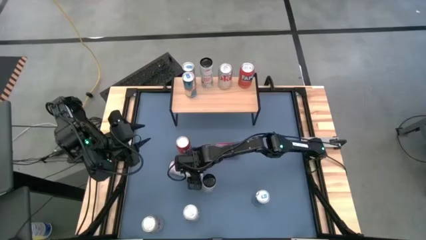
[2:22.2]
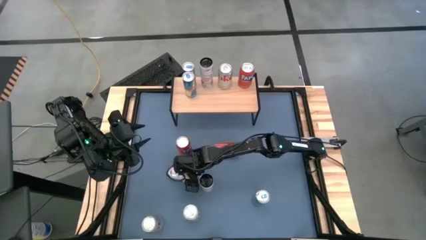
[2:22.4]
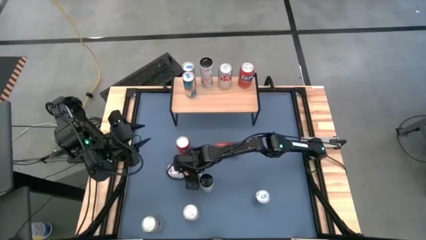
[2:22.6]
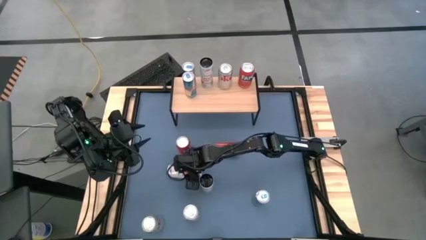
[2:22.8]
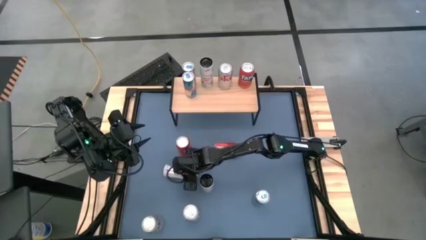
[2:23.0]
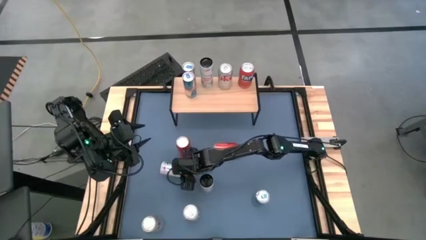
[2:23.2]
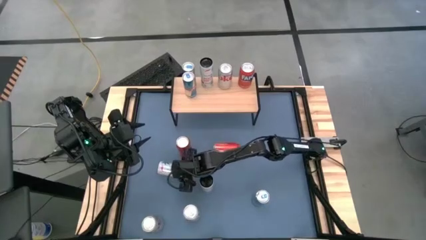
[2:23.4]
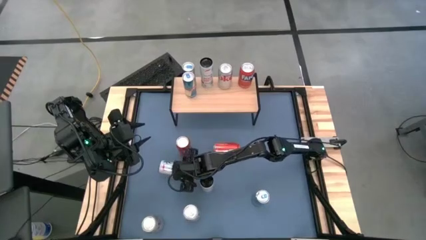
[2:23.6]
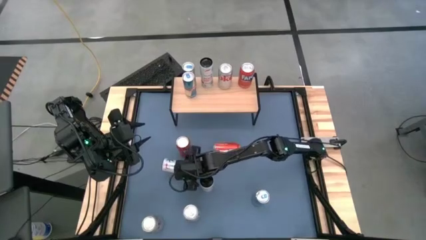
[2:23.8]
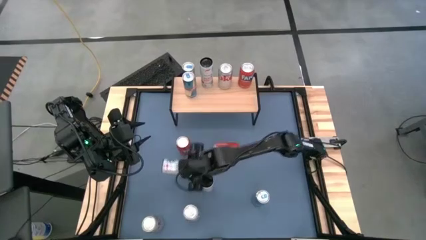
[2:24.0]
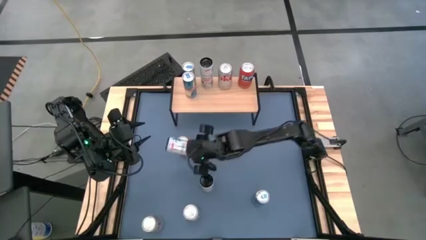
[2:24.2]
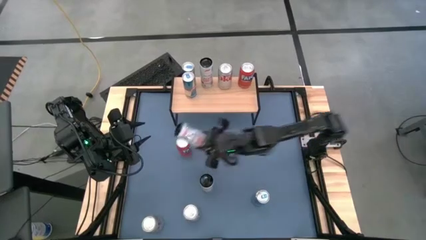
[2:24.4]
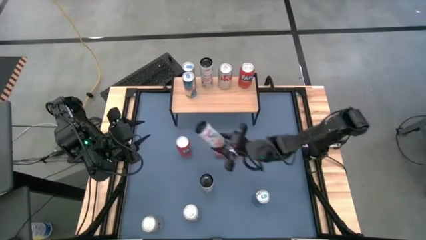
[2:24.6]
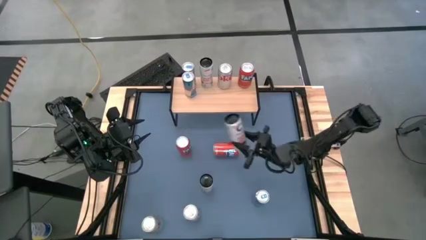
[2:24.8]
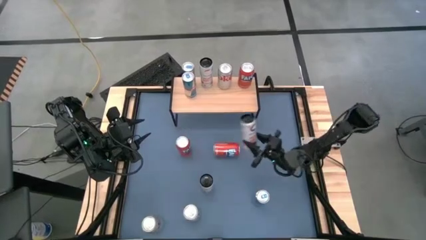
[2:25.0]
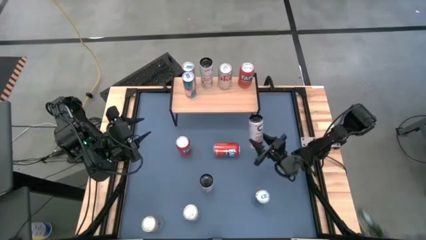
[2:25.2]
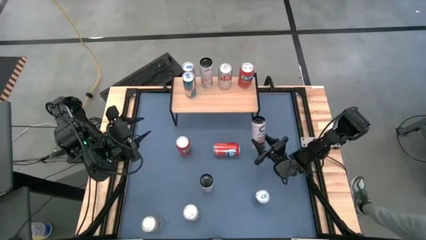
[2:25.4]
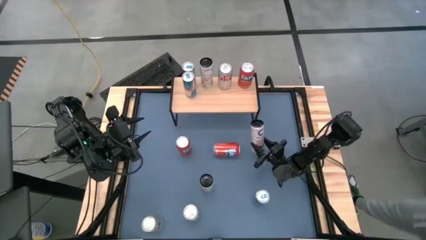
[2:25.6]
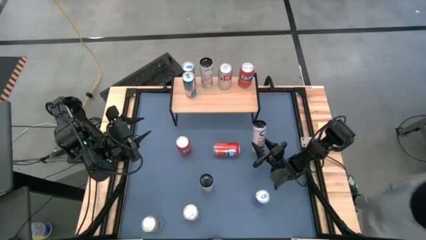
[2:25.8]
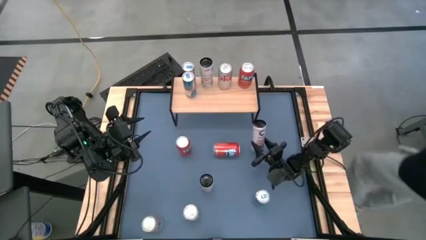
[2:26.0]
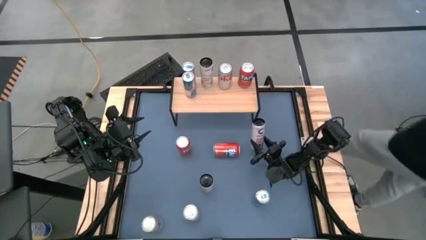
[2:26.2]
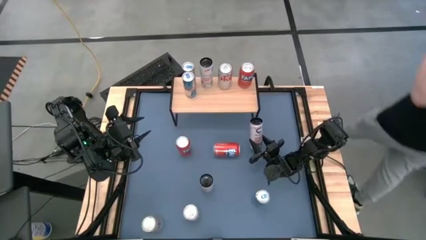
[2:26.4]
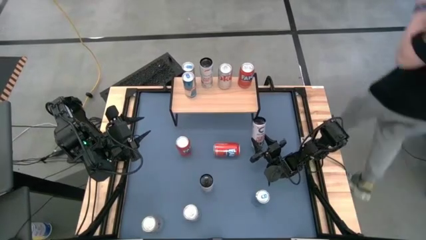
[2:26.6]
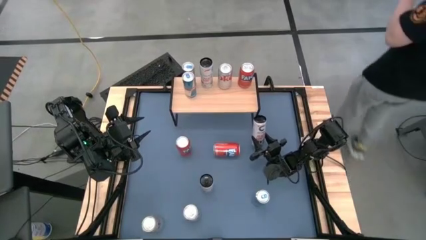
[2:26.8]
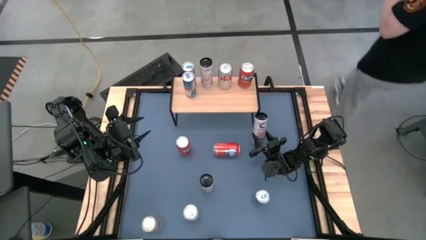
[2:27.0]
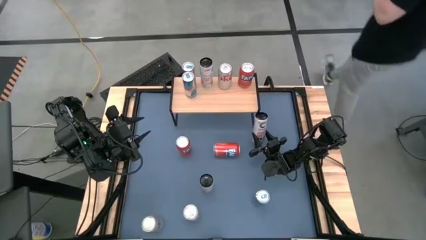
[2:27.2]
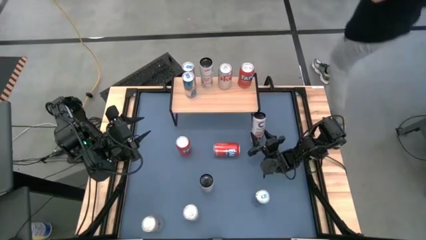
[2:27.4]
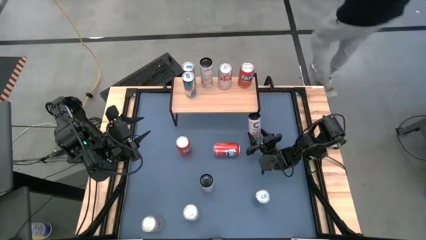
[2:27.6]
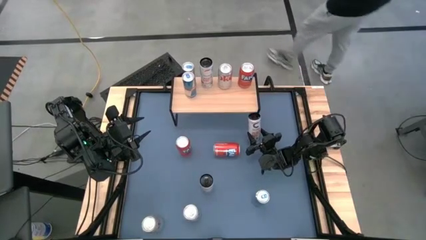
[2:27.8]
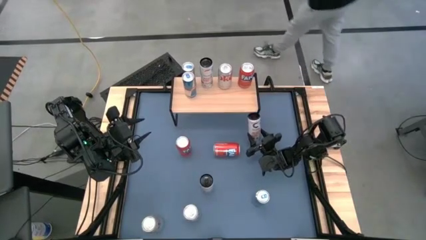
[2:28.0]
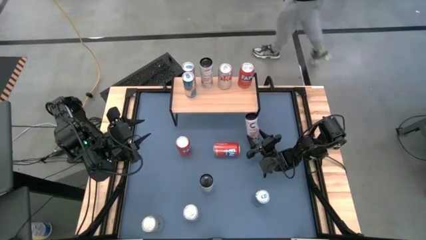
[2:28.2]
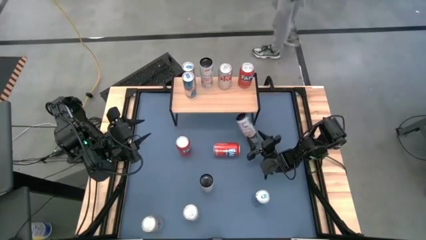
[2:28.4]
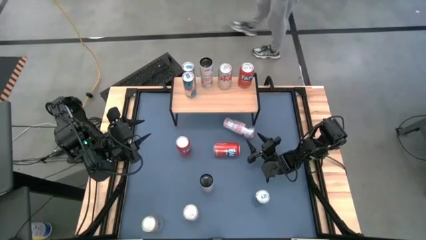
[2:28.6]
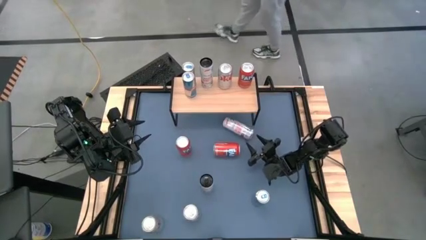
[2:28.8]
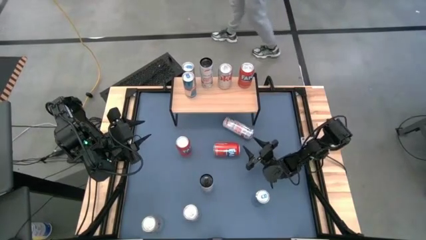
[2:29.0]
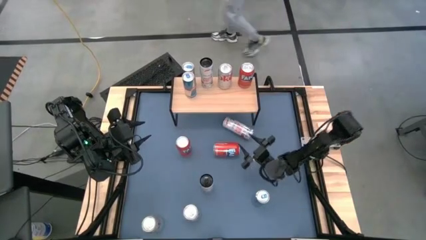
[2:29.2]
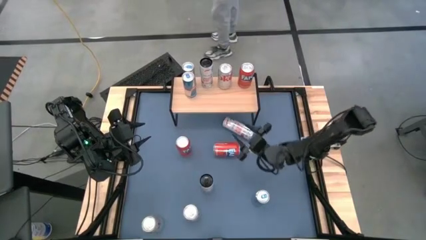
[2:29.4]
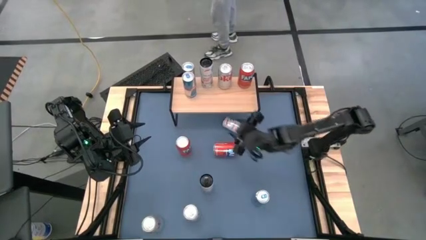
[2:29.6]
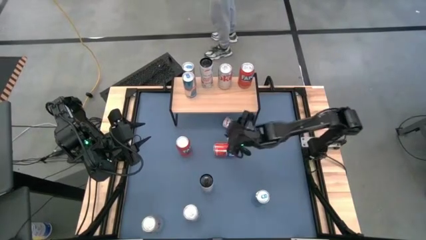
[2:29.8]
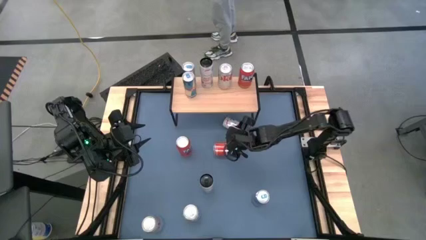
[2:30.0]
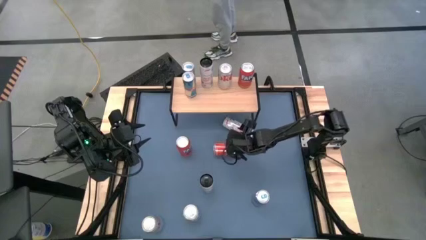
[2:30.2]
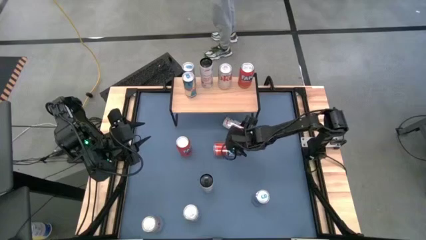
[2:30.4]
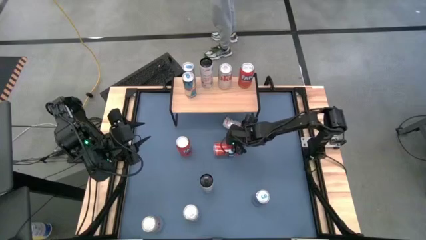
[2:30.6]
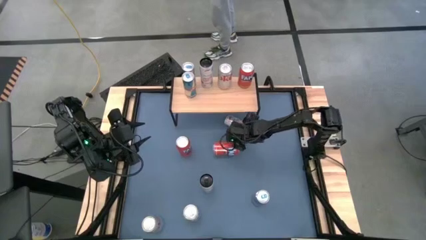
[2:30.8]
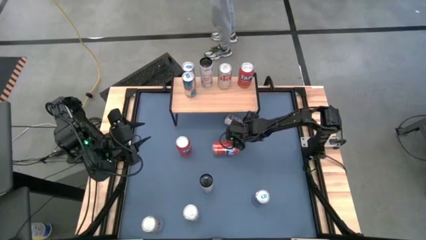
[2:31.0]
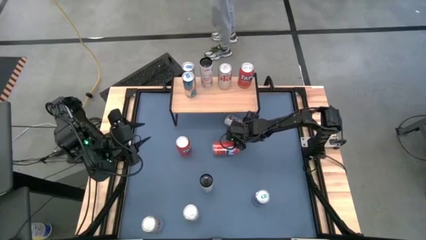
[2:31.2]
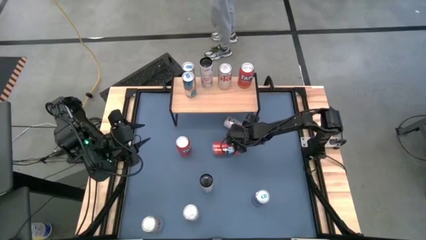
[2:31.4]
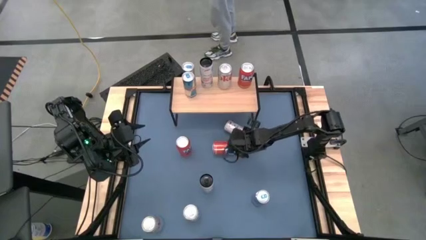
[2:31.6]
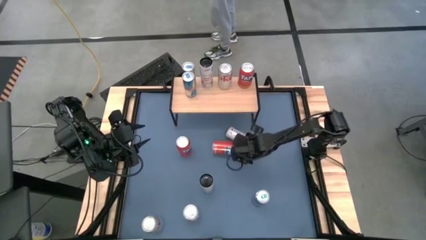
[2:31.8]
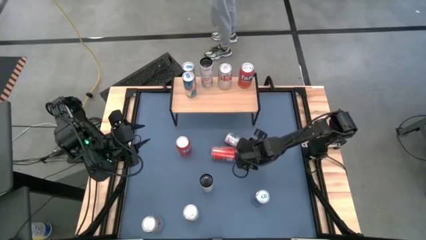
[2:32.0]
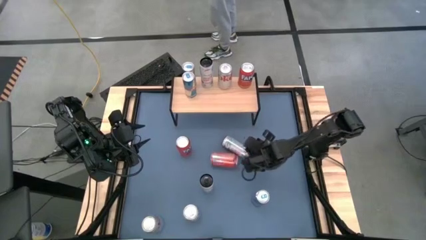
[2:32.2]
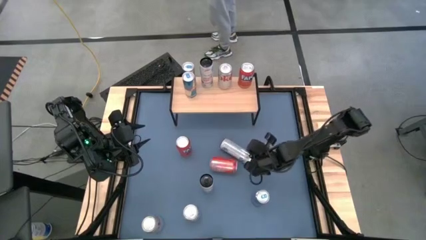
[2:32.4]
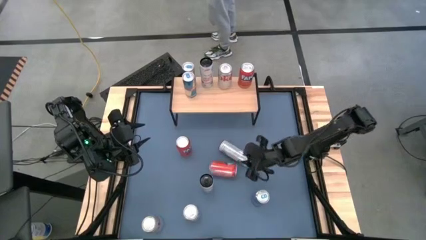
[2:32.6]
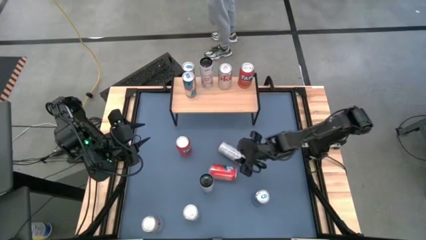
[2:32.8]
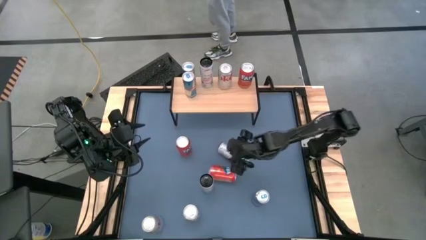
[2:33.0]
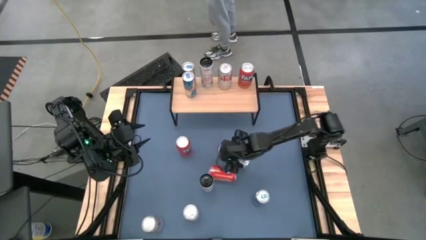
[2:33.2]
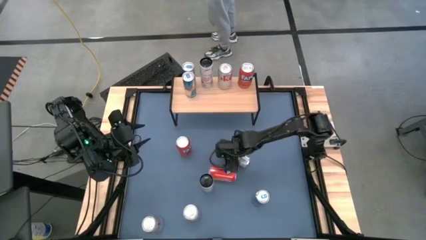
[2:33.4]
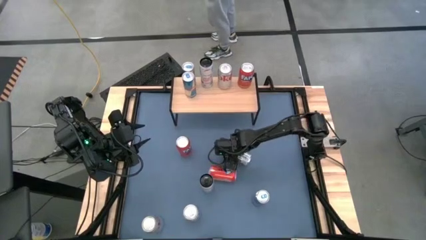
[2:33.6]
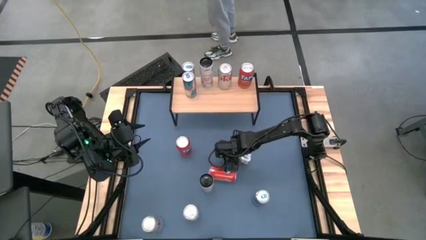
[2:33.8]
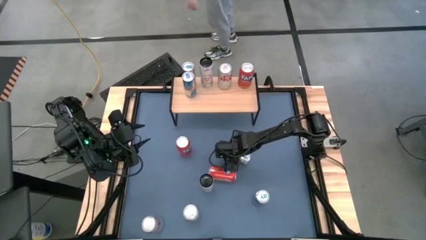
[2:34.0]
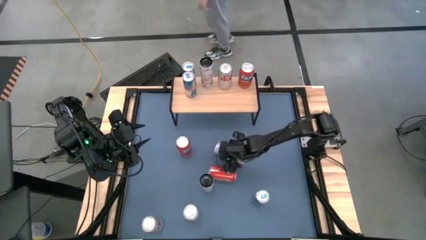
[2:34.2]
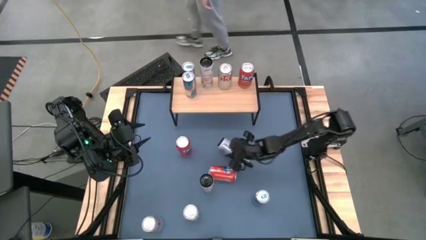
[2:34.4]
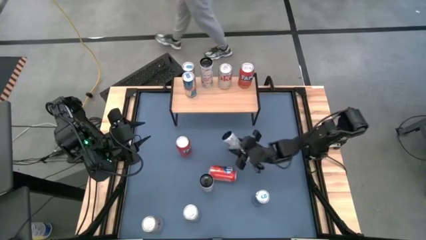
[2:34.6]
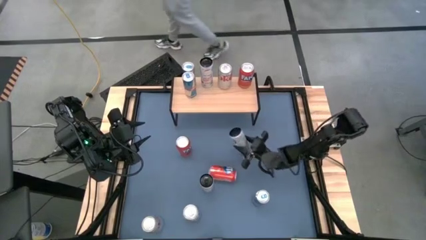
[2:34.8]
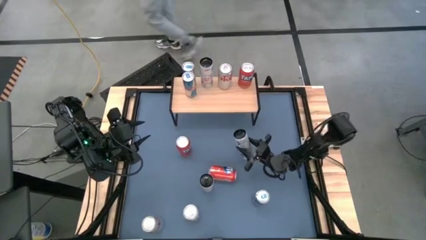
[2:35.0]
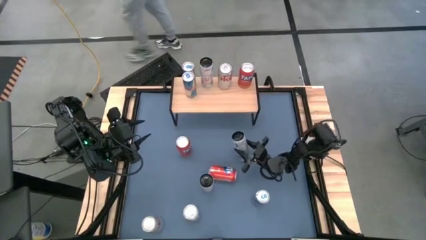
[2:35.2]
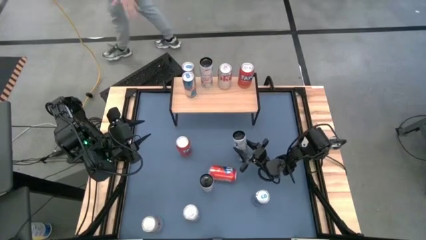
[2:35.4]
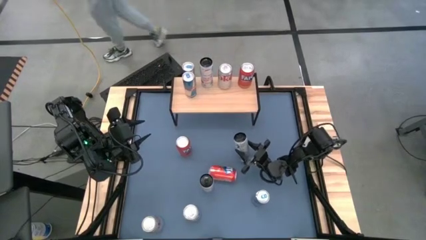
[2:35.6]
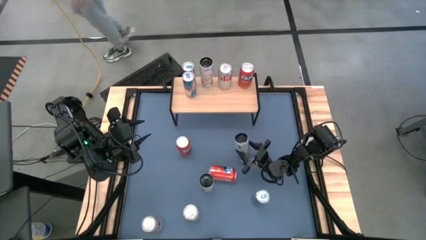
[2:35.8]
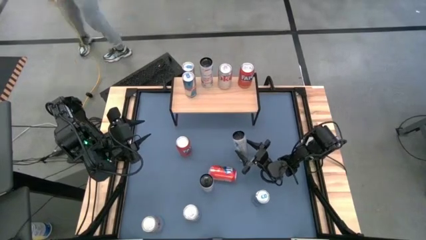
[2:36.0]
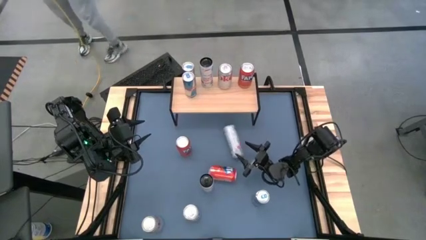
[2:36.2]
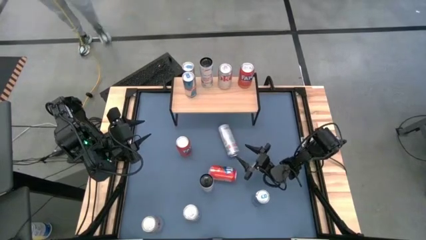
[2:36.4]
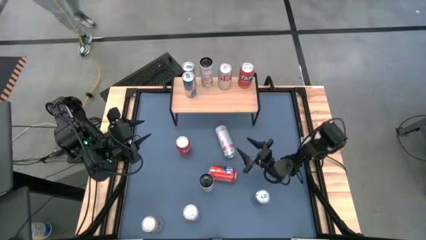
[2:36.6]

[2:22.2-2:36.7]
Task: Place canned beverage on shelf
Put the left pink soda can on the shelf aligned with the other pink soda can
